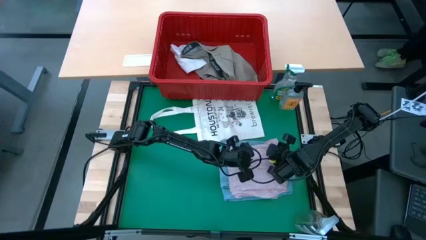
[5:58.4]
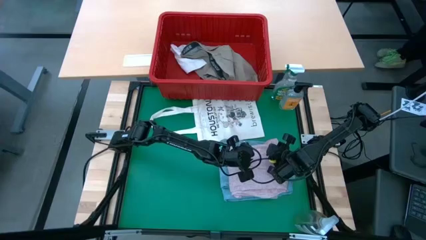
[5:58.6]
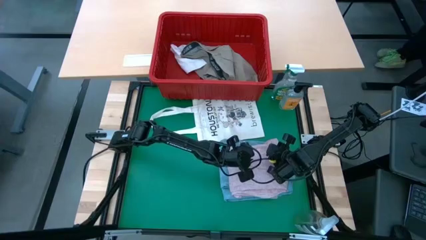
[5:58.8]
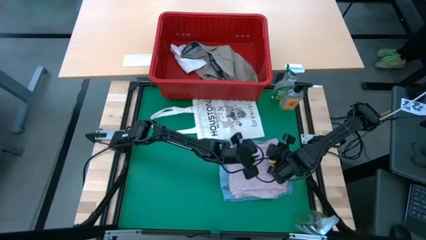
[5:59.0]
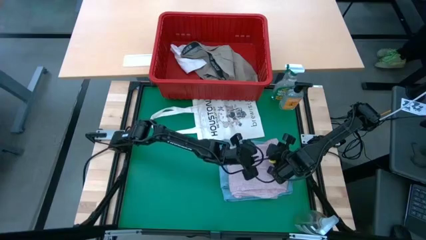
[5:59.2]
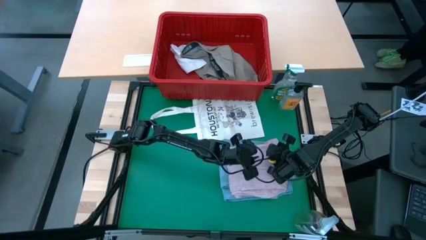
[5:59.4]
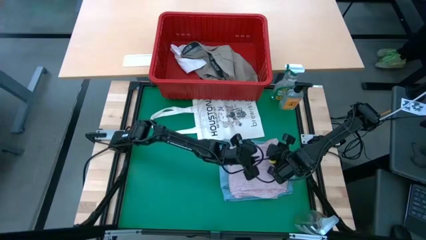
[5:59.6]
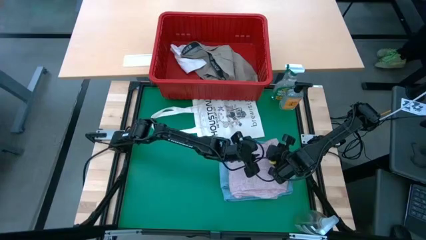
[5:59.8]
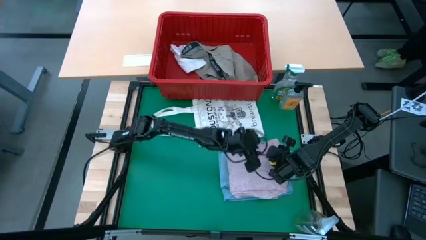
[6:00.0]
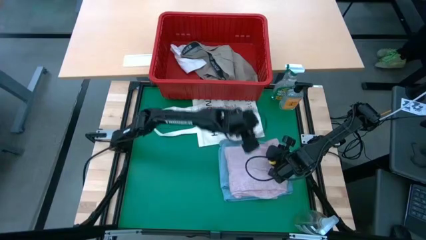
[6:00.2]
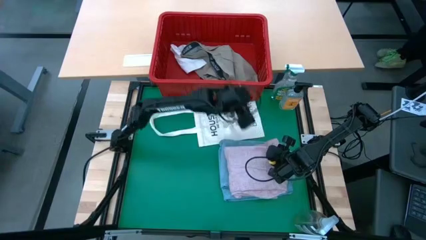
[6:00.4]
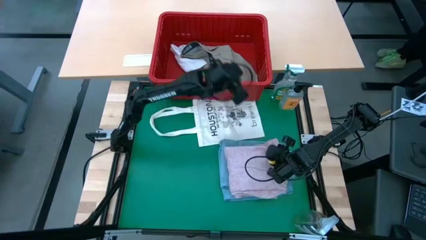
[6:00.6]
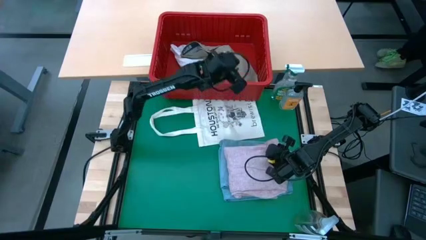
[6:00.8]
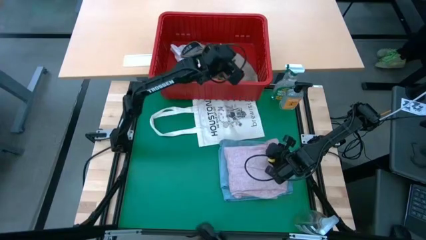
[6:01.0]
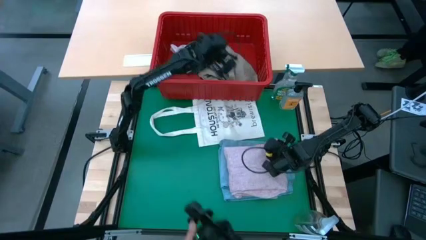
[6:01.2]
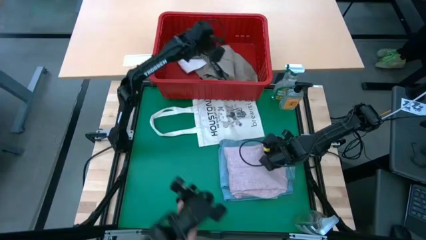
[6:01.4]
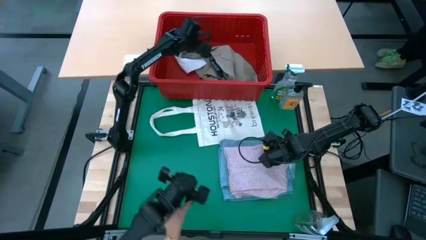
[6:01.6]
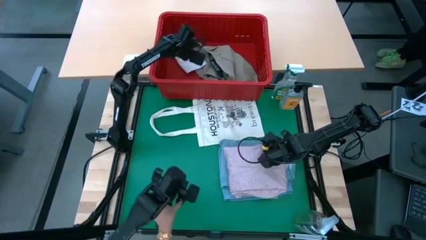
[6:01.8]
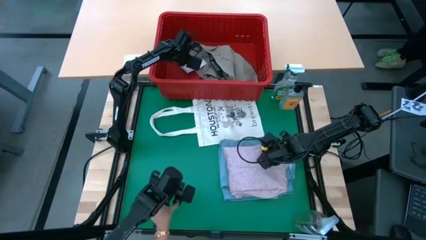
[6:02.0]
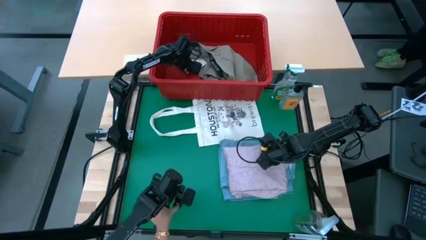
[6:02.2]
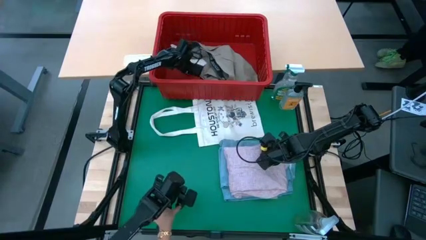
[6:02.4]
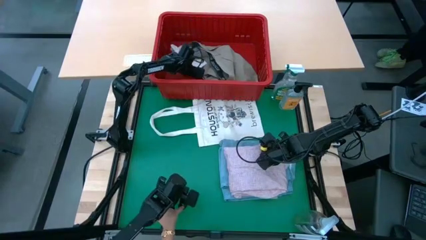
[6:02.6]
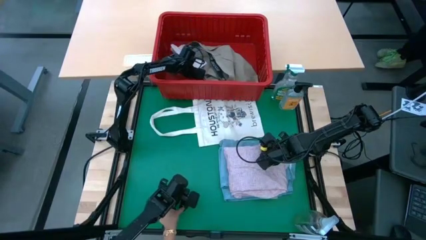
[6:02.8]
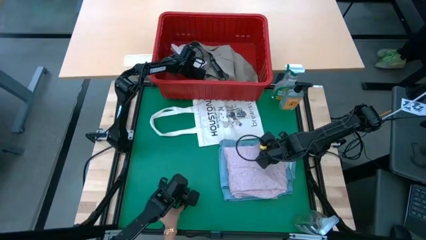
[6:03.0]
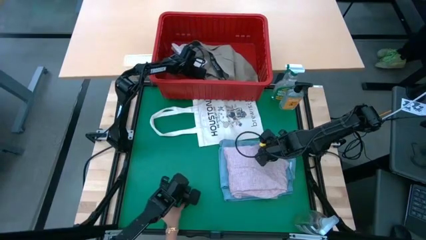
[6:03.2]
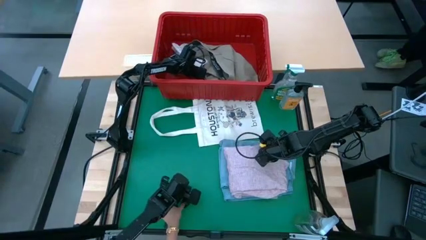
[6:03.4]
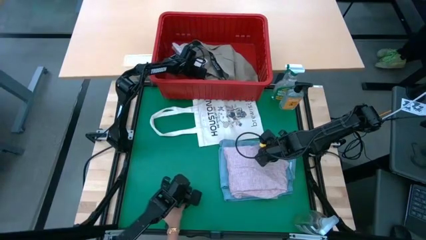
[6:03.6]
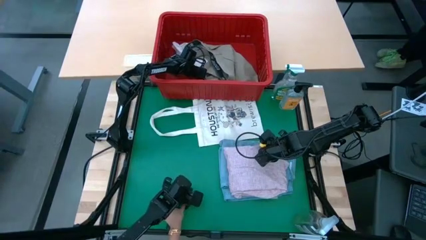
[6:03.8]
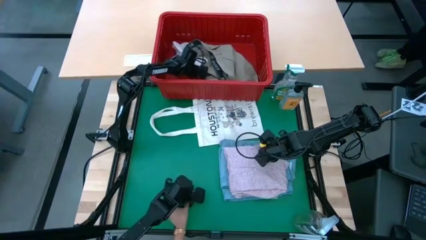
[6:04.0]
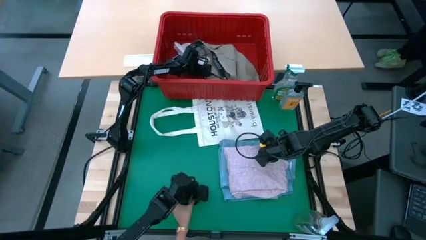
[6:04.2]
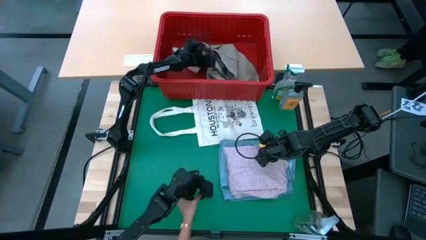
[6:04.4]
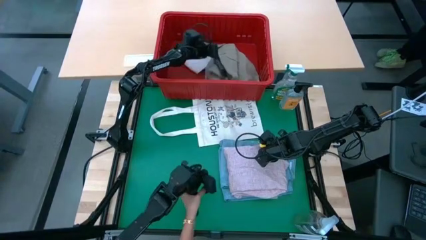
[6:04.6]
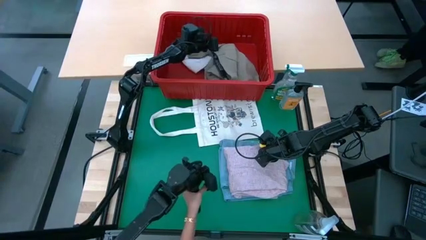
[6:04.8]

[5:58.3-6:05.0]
Task: Fold Laundry from Bin
Fold the white underwear from the red laundry basket
